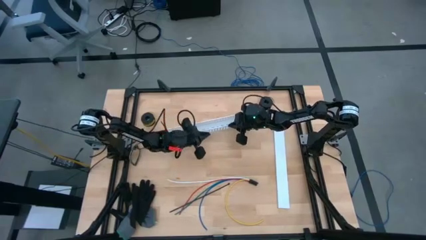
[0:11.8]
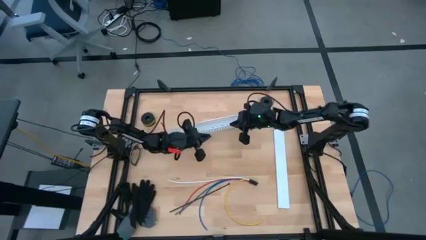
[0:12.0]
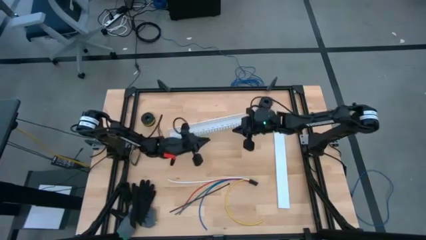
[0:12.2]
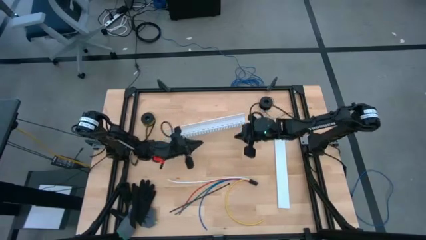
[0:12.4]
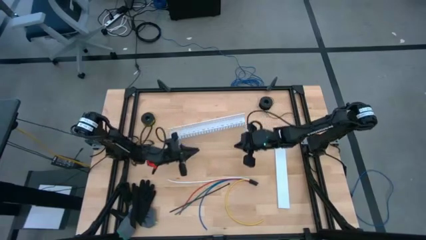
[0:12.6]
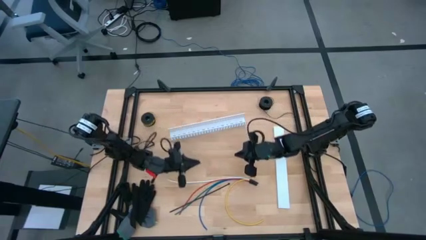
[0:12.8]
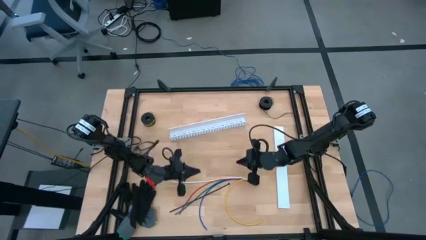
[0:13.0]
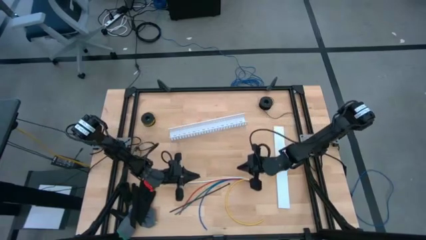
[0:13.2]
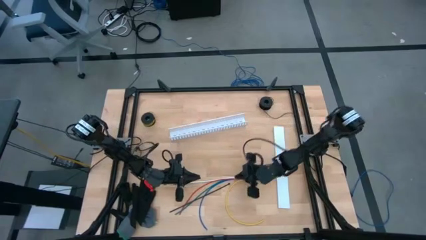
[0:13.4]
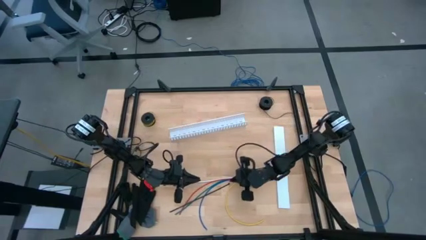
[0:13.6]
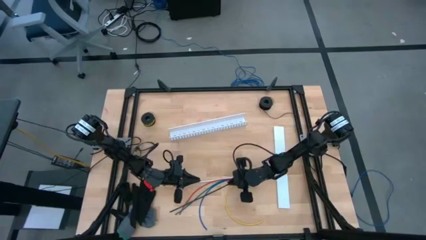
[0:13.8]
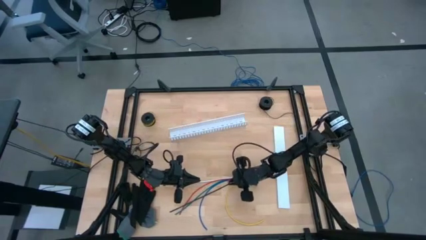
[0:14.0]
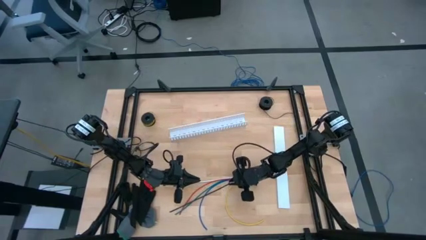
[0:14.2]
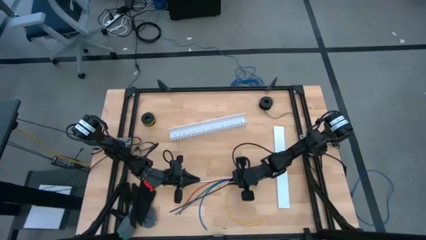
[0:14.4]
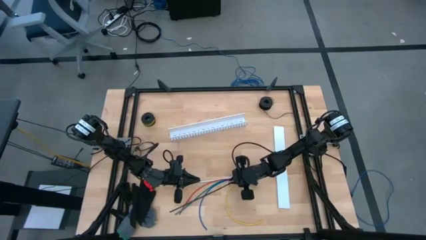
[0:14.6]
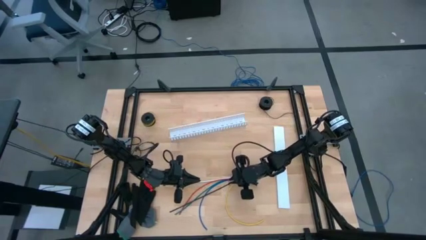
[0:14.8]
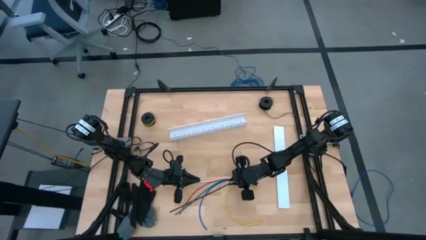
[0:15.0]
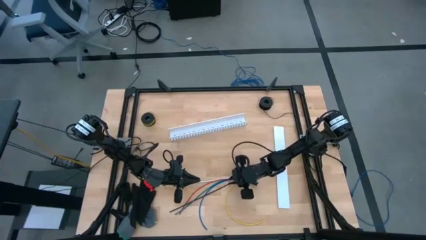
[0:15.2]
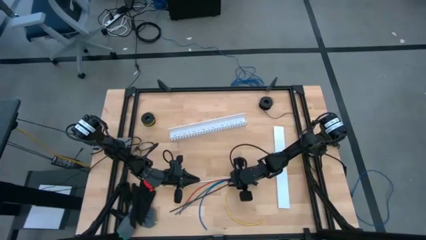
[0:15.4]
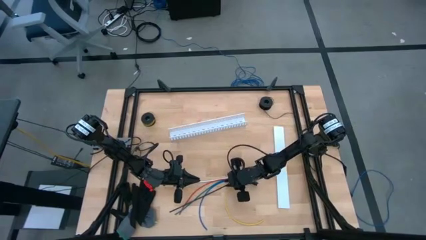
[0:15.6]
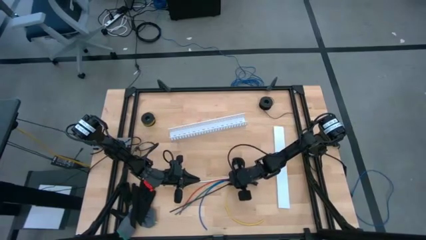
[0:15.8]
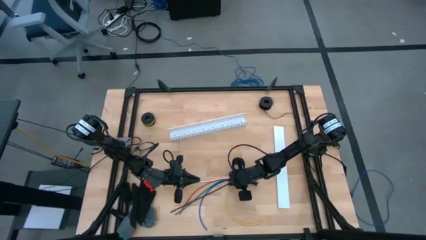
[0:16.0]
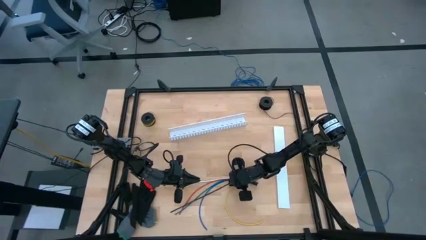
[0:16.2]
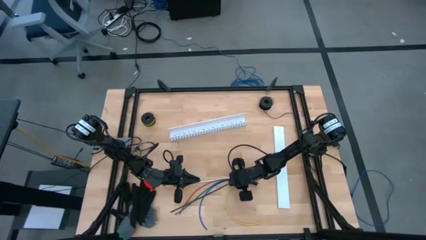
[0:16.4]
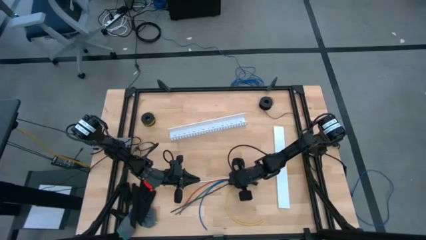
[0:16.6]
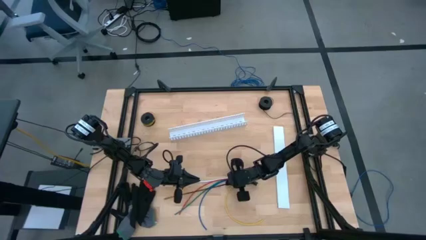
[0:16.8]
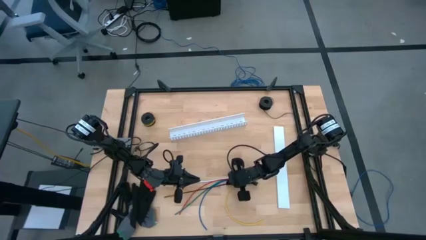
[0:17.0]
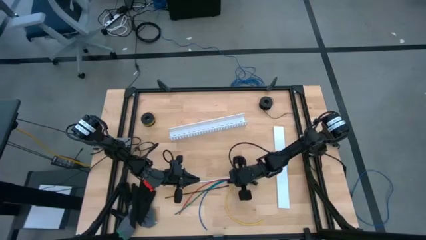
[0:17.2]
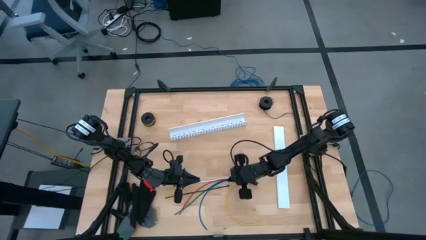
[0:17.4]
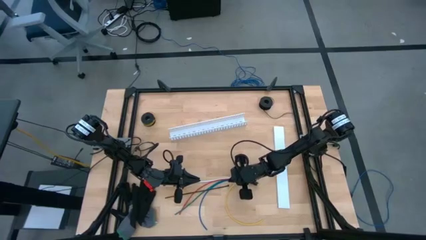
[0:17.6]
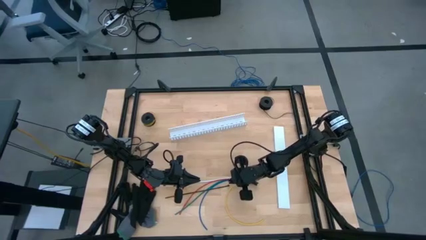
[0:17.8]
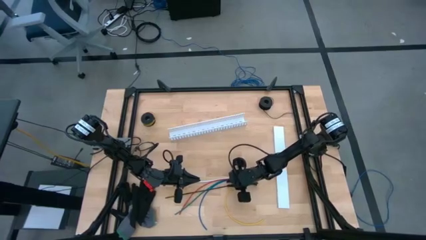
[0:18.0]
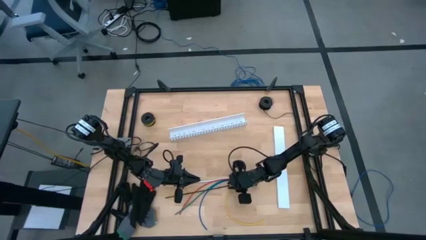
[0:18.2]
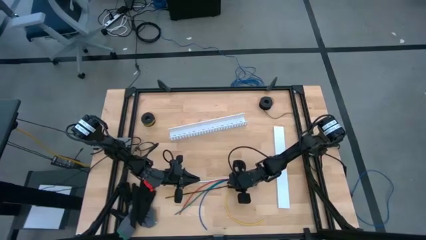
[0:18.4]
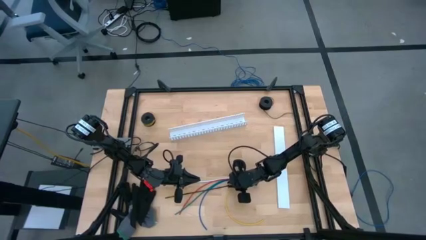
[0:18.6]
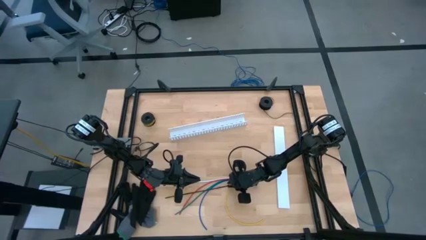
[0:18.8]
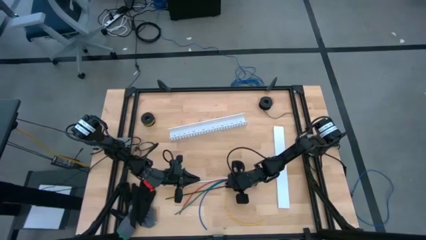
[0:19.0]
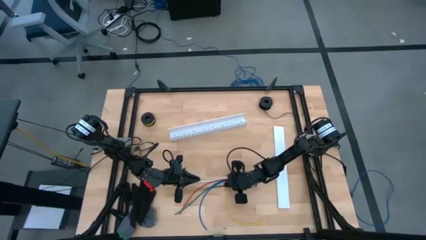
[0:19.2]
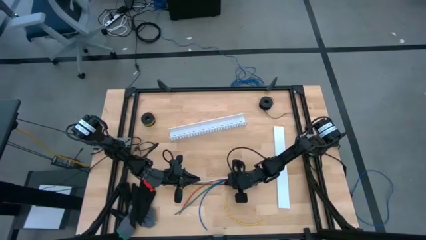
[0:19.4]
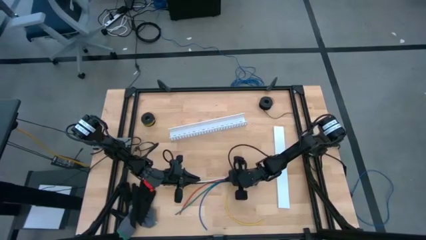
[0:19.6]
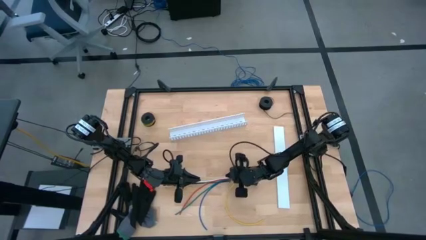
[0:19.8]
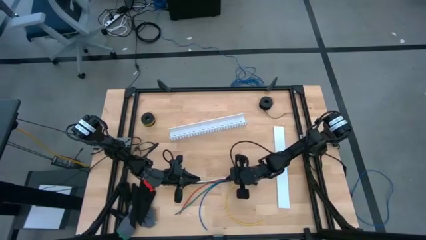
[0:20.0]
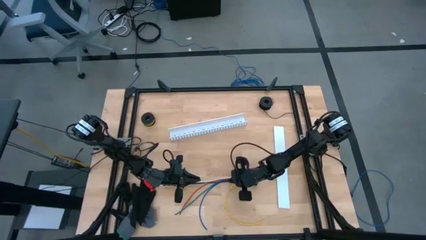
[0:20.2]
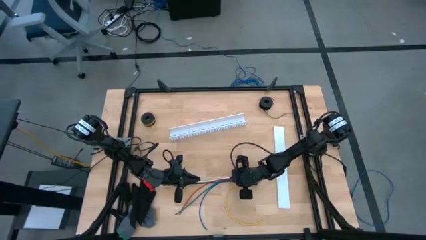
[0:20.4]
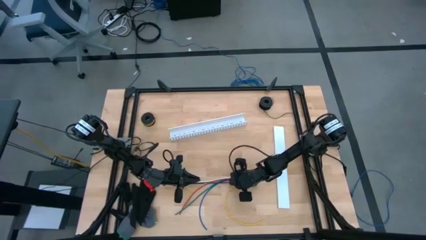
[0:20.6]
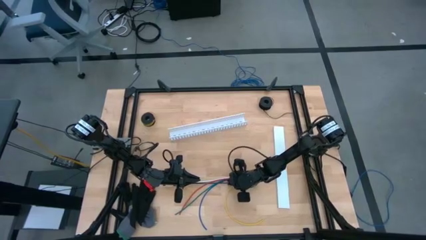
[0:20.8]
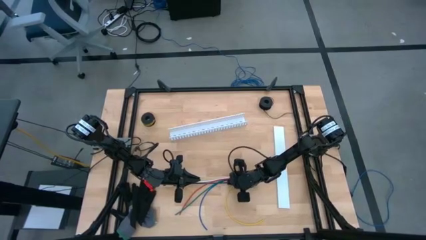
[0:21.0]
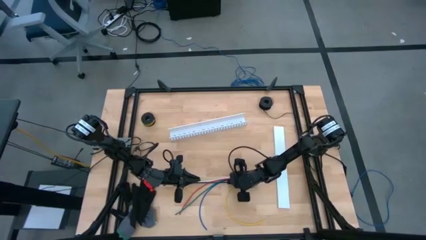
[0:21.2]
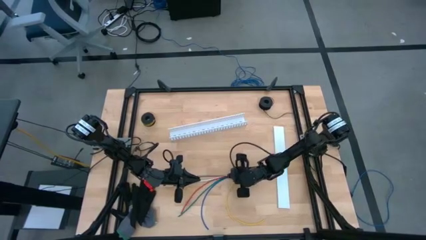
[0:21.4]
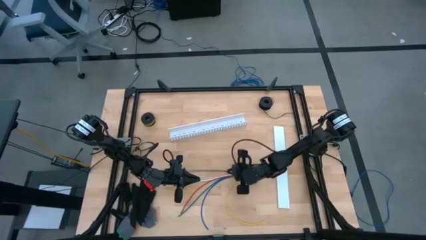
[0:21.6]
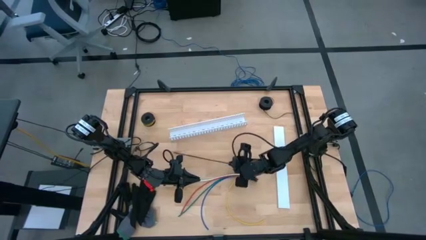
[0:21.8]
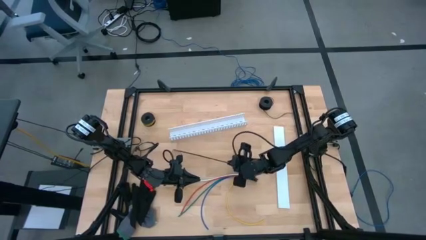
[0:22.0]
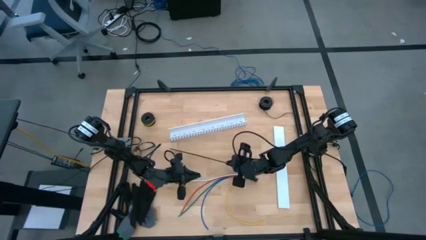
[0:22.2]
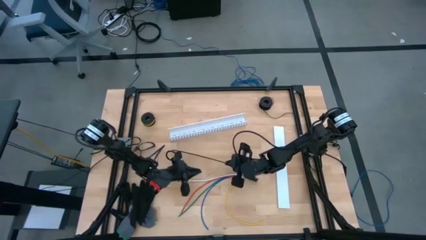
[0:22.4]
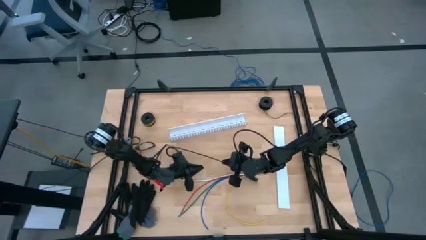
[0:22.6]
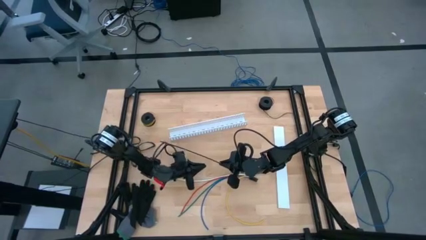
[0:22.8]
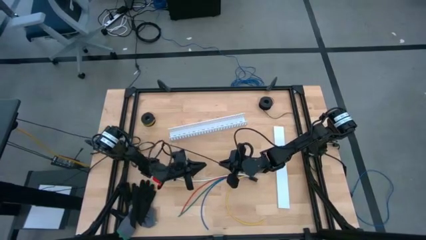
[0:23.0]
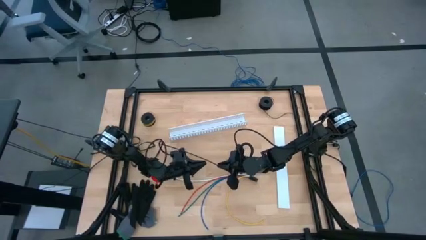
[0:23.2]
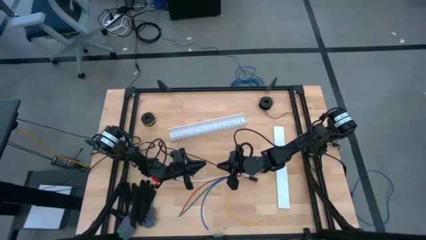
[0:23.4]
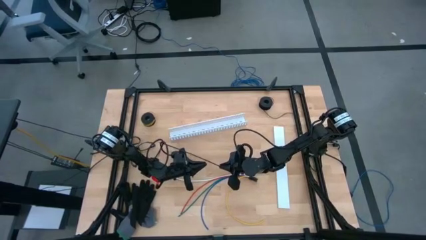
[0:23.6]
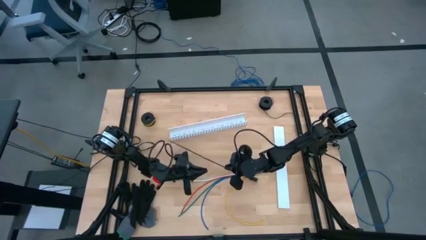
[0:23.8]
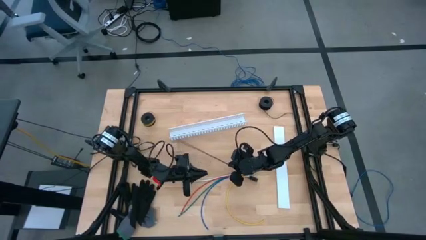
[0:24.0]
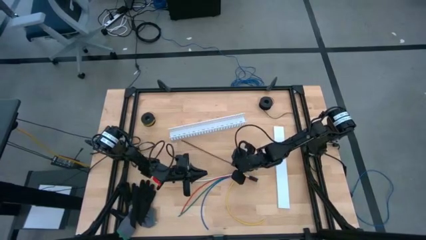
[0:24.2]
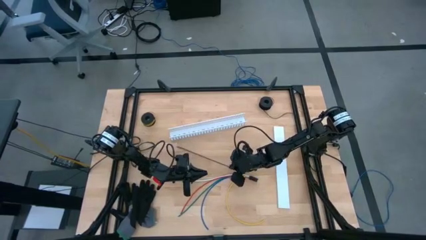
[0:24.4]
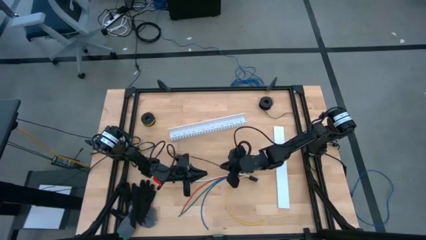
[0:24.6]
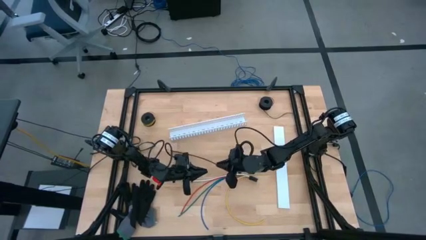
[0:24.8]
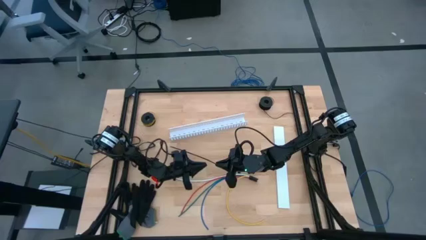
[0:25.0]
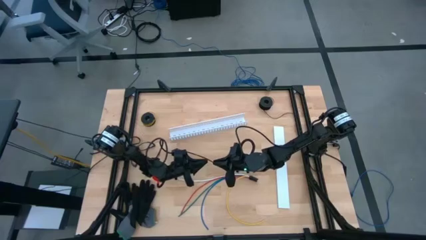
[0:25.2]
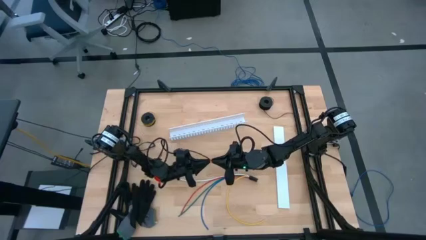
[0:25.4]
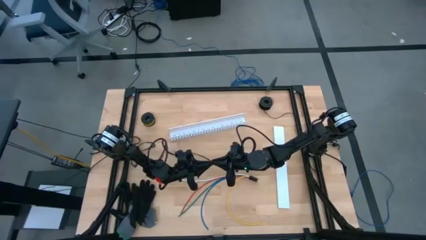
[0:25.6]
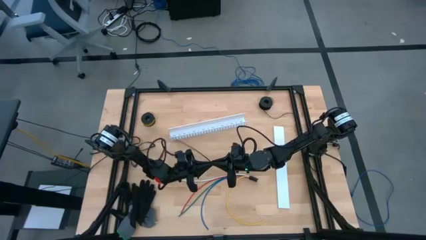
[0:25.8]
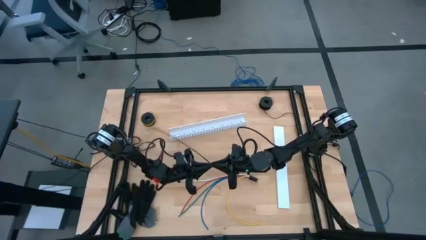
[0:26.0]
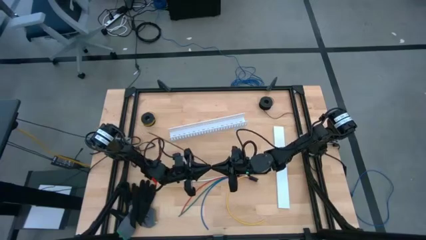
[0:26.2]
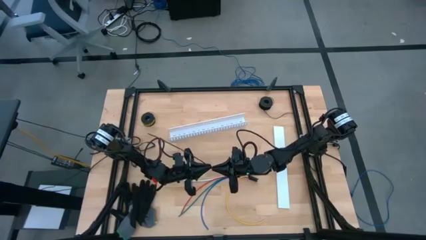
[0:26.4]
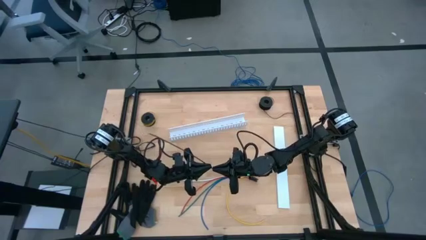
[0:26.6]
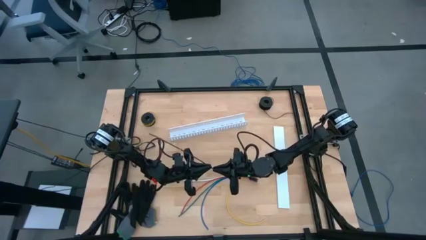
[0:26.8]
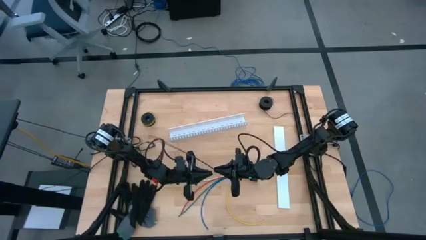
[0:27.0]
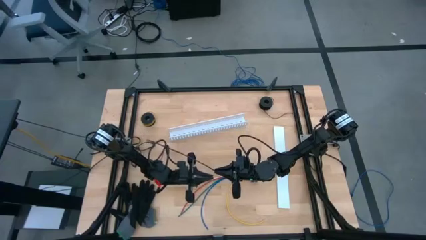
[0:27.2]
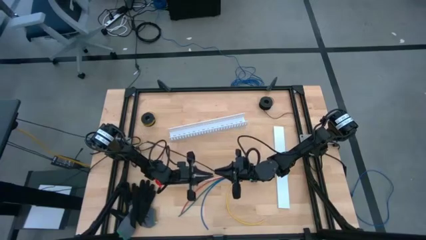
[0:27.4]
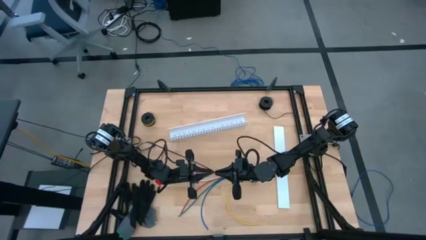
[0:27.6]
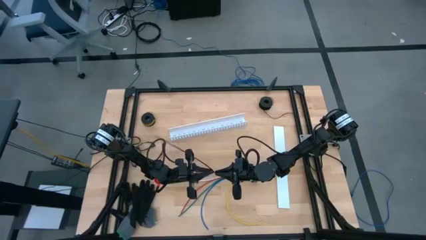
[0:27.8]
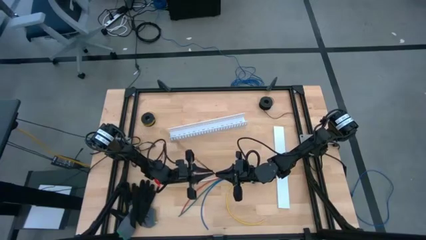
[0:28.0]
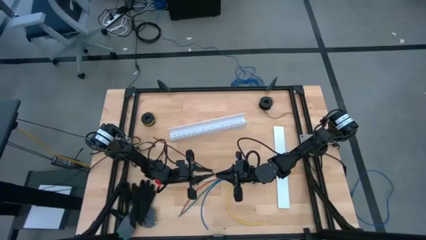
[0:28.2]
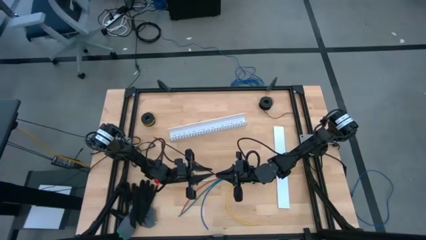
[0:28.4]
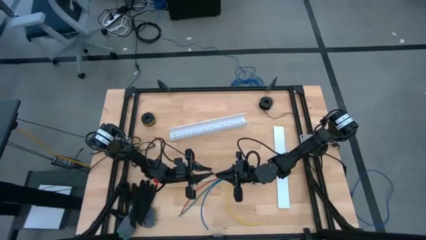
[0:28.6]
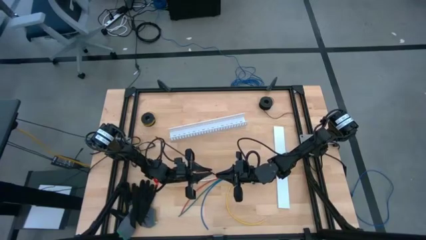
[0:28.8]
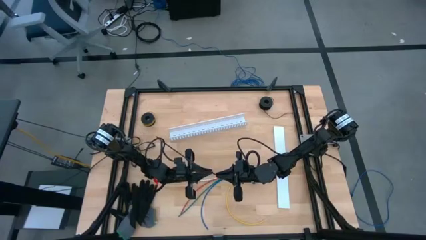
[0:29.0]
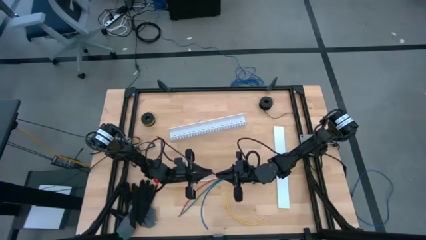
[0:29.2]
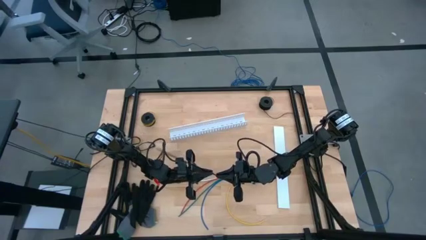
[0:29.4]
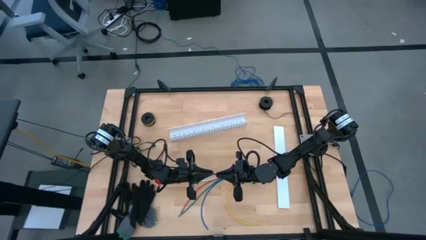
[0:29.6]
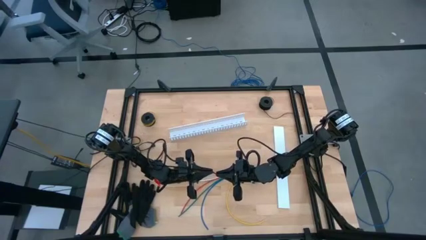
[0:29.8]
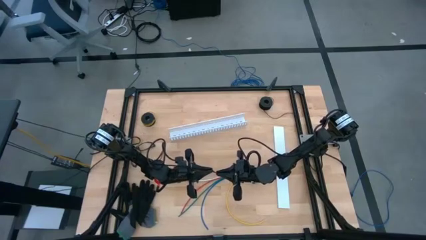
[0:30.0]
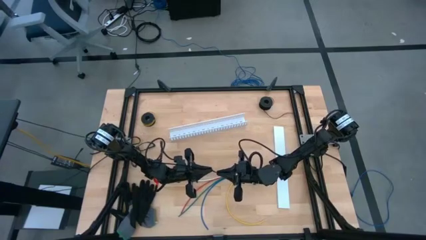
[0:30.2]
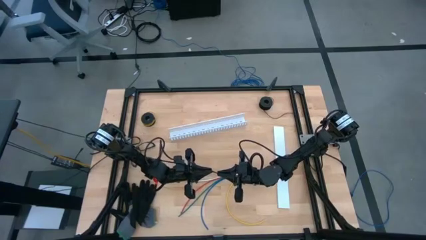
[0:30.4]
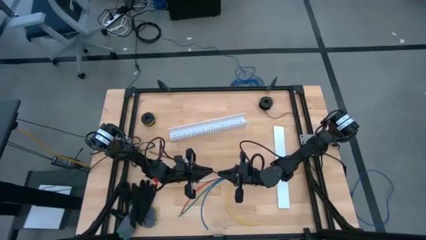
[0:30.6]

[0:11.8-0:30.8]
Task: Ziptie cables
Insert zip tie on the cable wire
